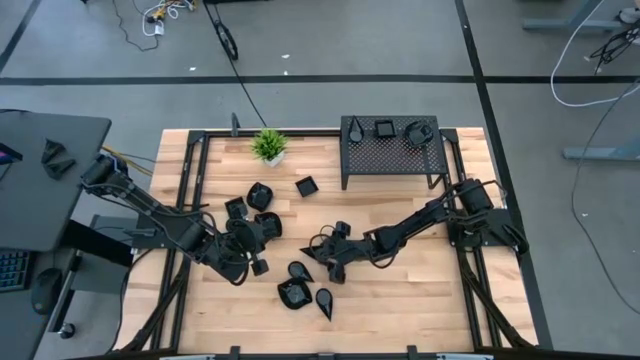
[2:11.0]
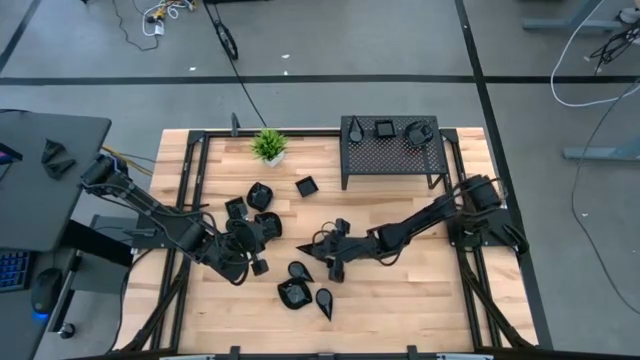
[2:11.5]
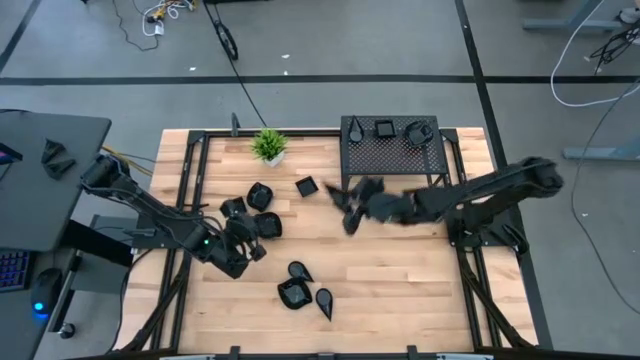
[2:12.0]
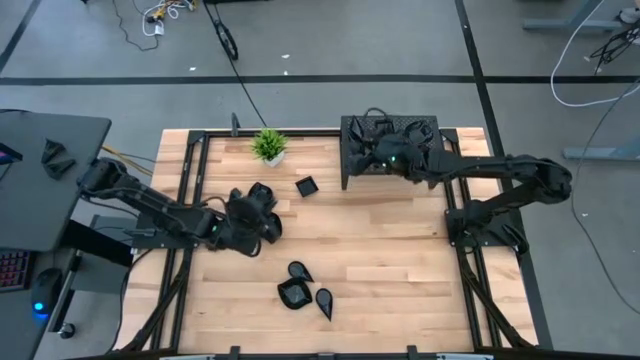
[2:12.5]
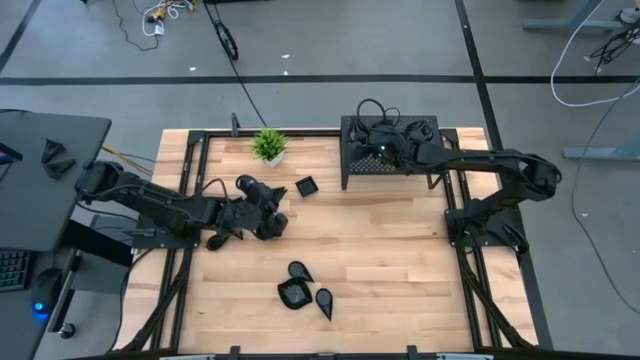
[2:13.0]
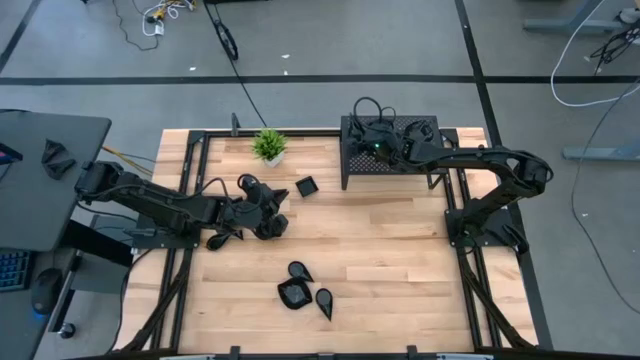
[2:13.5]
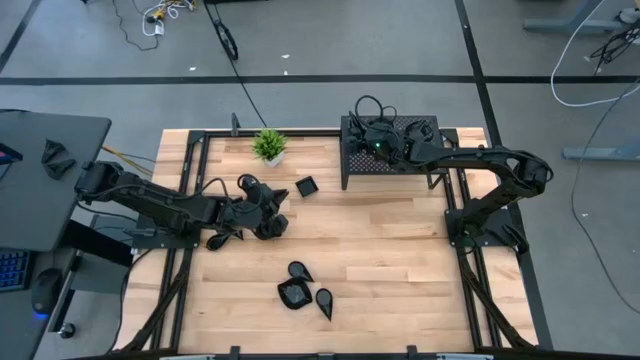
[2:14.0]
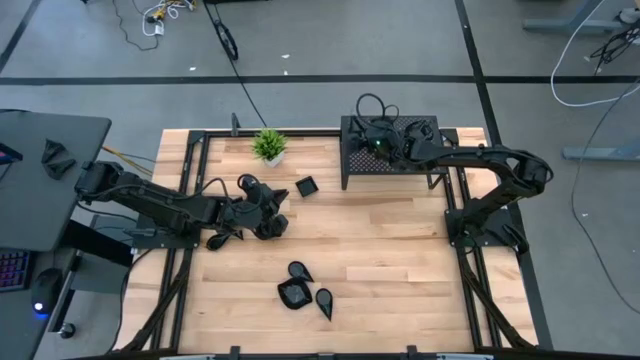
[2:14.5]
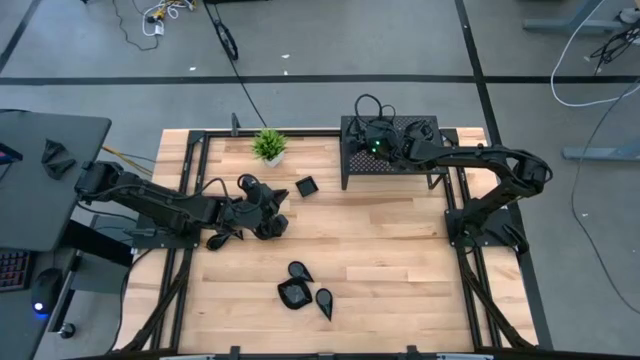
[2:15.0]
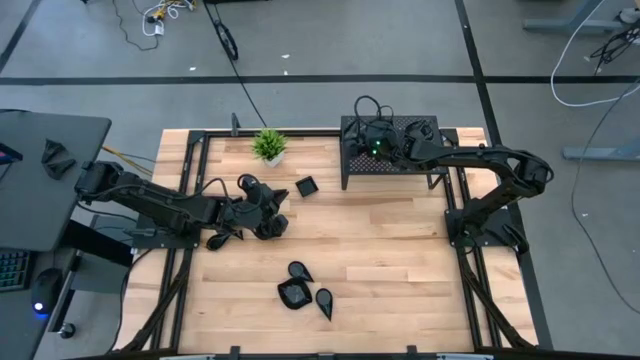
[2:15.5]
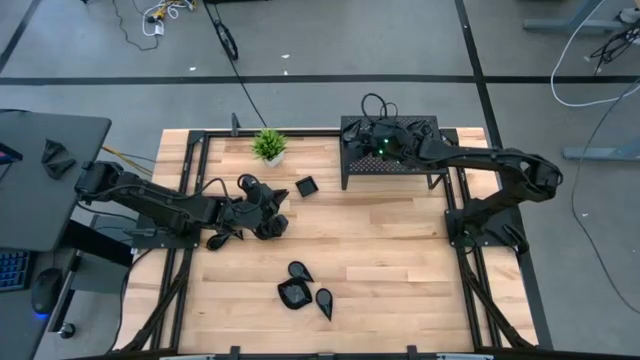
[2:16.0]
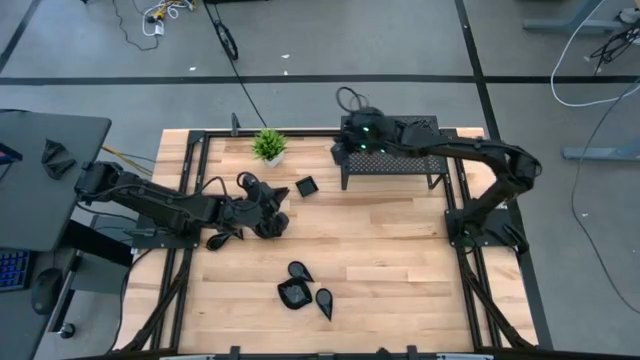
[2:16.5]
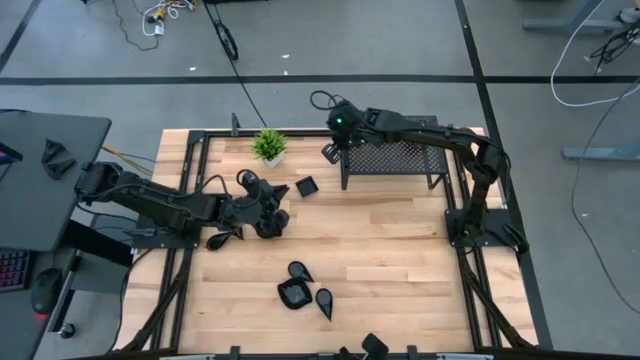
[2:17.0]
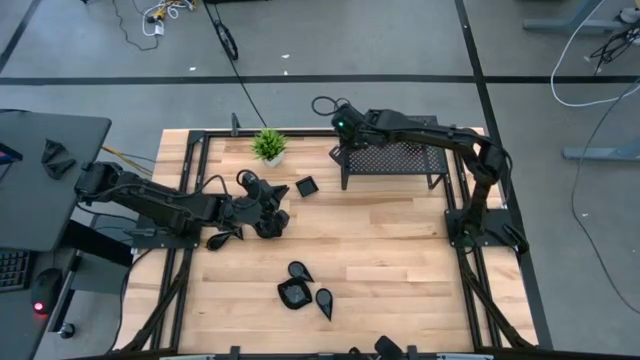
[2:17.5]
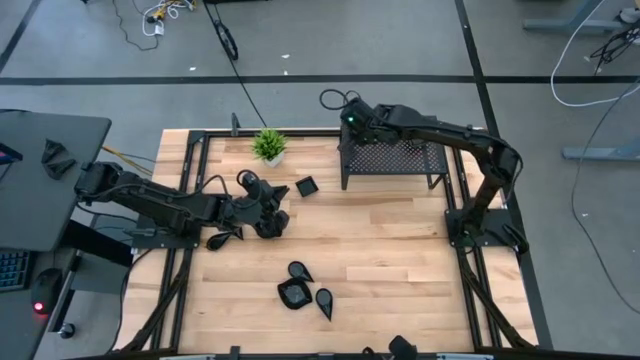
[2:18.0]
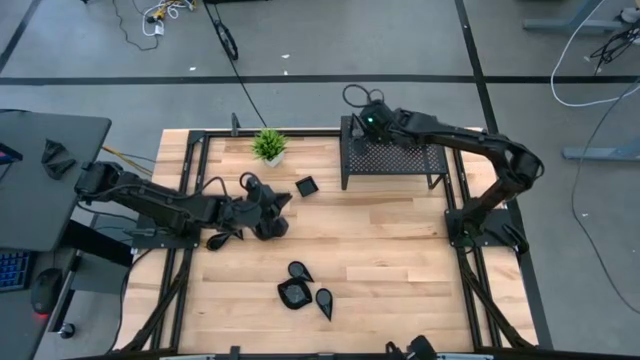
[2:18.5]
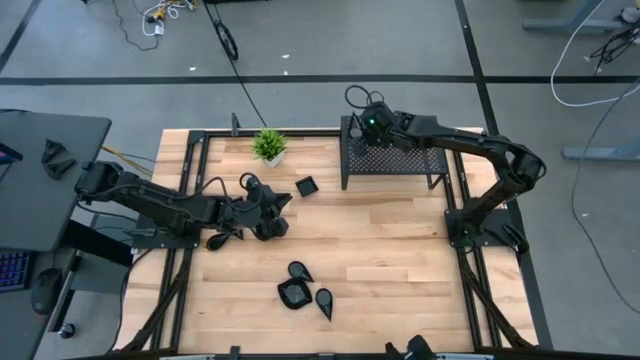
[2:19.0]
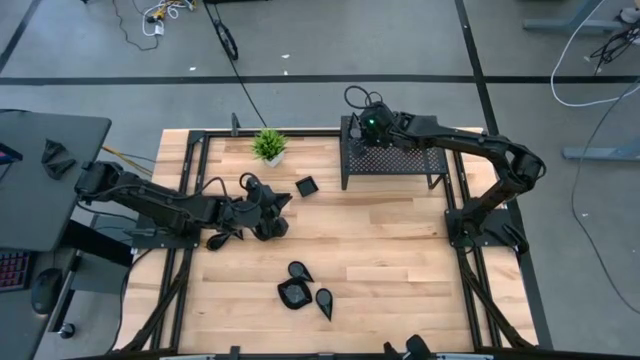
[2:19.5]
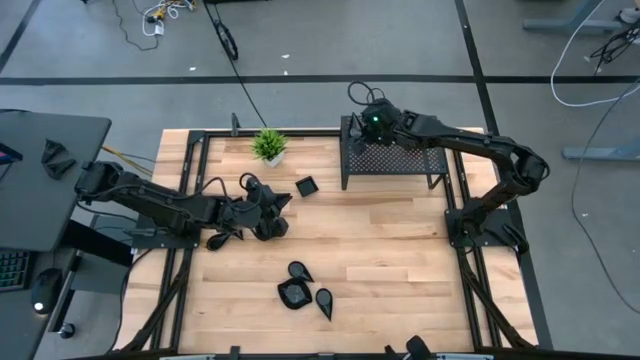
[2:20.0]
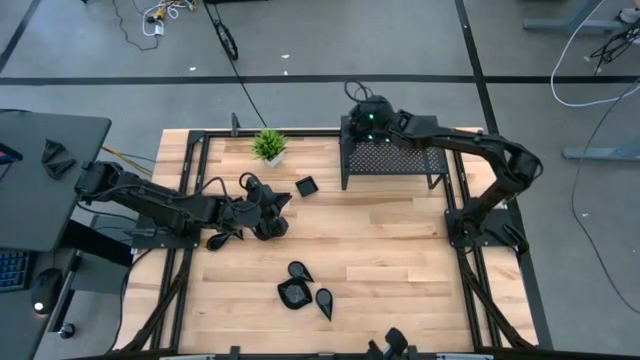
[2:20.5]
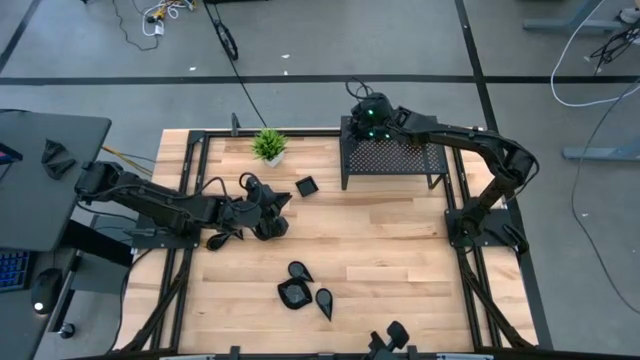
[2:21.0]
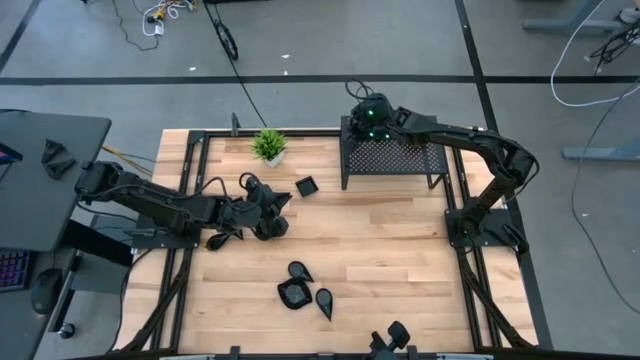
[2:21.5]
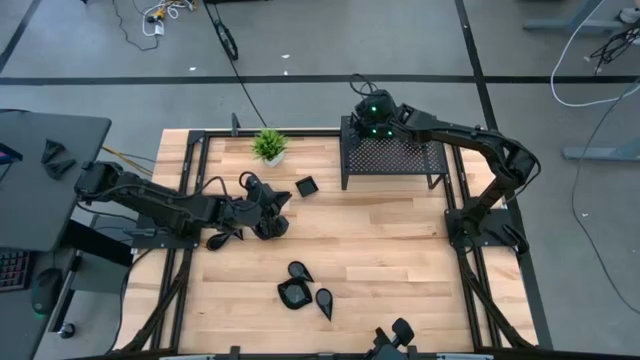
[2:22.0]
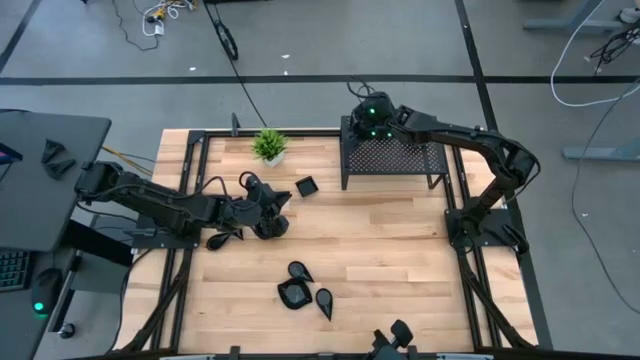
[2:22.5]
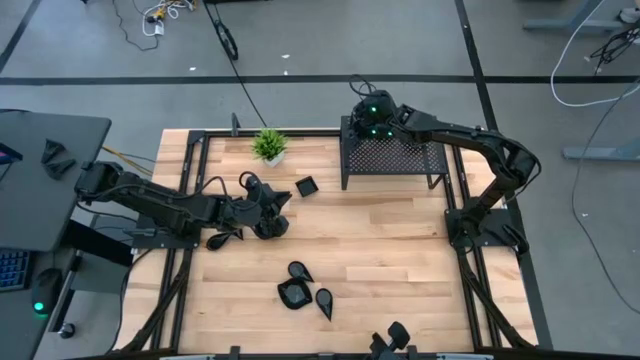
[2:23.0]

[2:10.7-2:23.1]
Task: Pick & Place Mini shaped plates
Stack the black drop-shaped plate on top of the black drop-shaped plate on the shelf

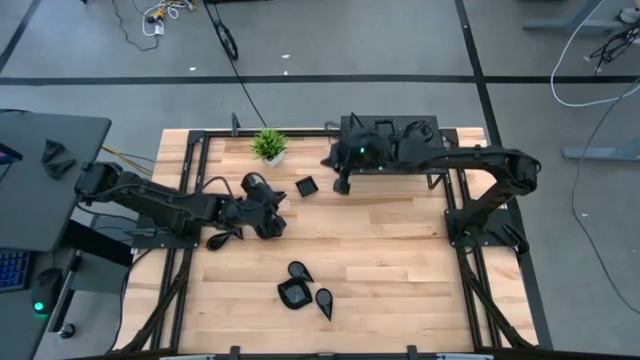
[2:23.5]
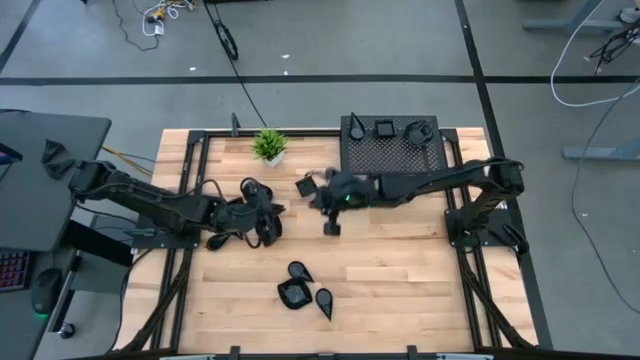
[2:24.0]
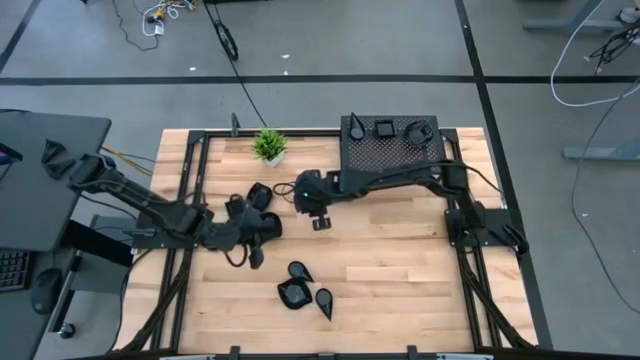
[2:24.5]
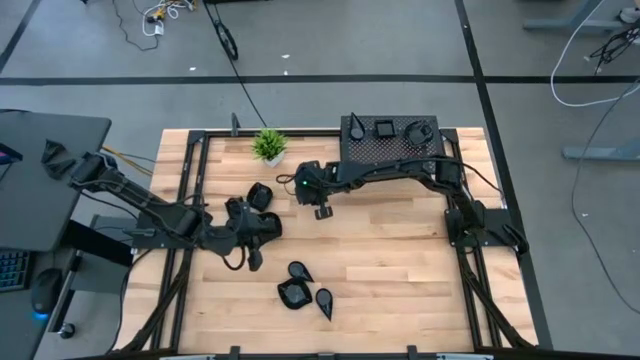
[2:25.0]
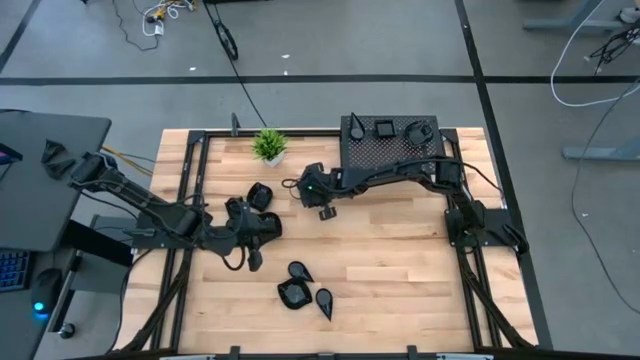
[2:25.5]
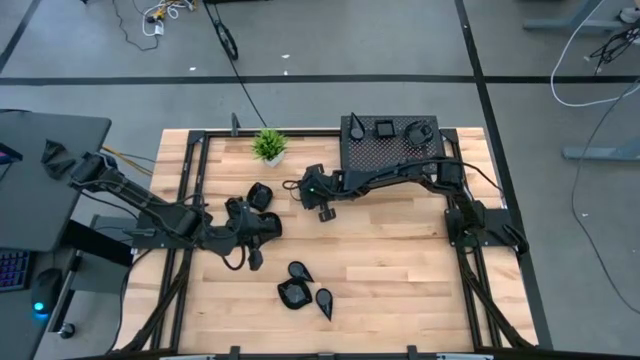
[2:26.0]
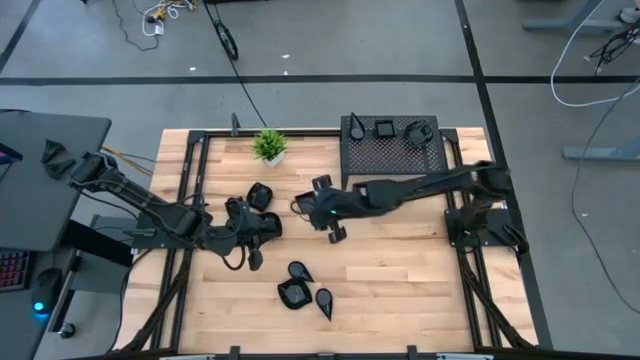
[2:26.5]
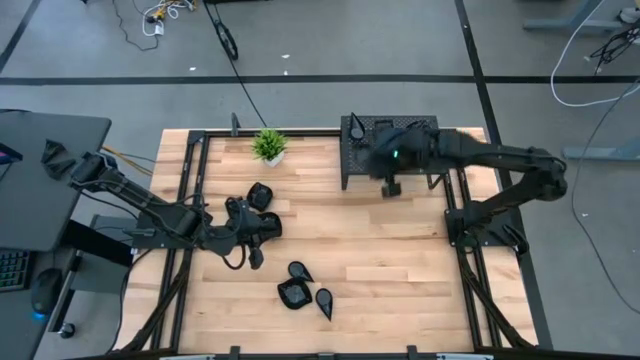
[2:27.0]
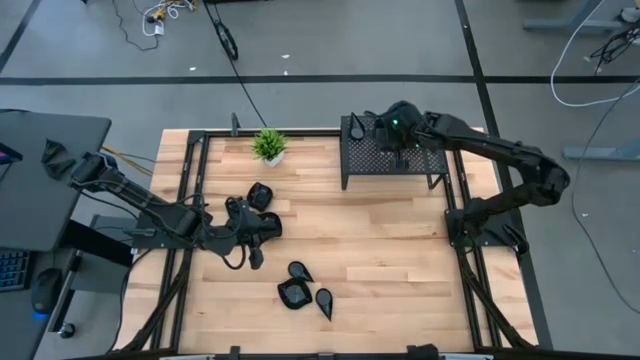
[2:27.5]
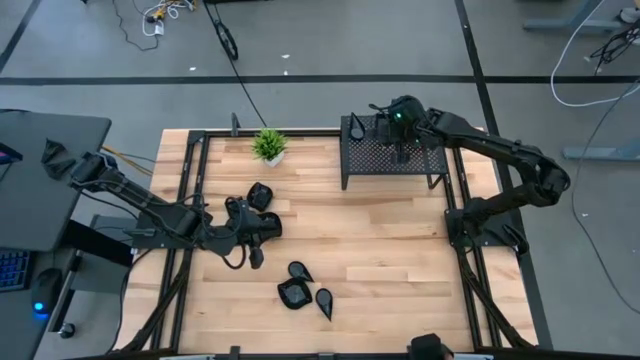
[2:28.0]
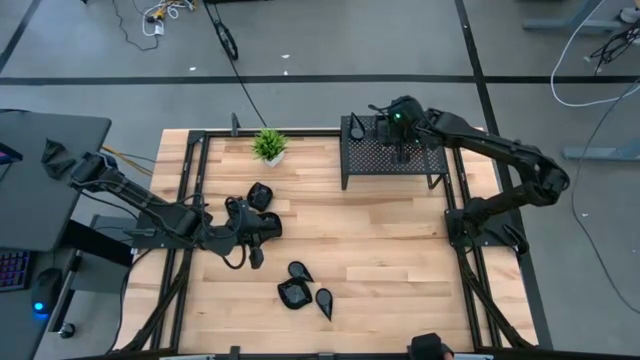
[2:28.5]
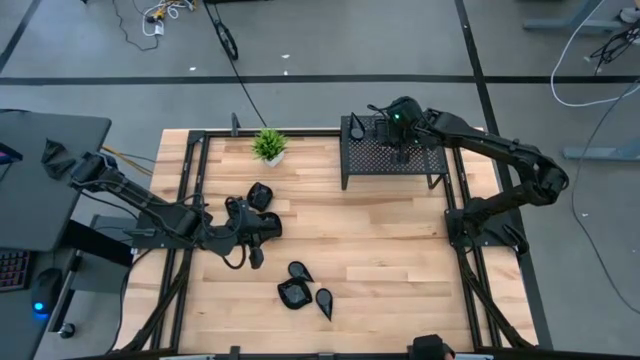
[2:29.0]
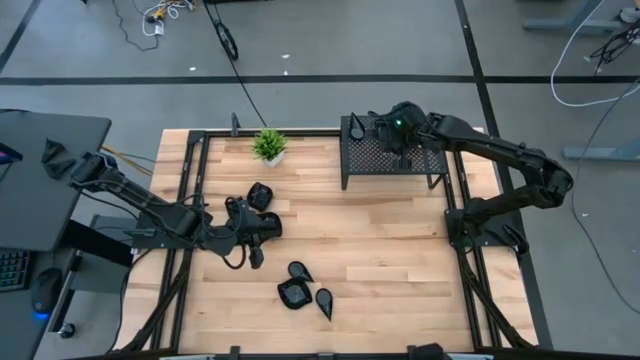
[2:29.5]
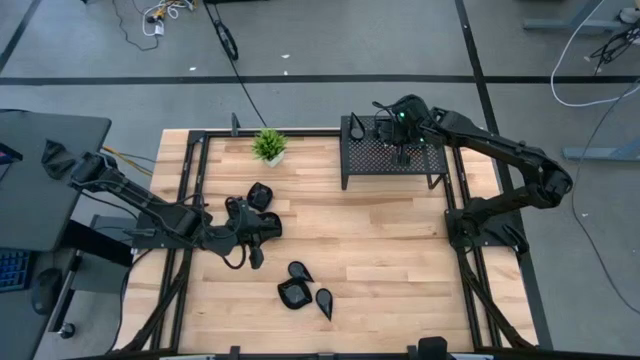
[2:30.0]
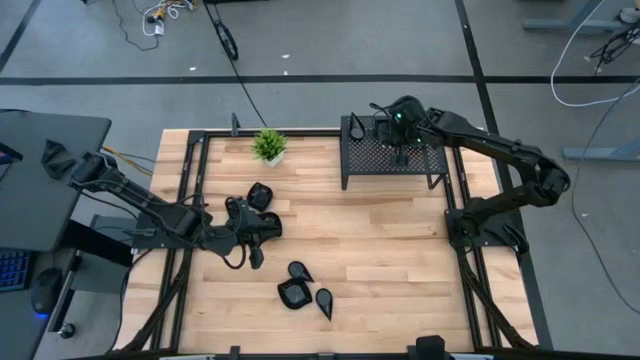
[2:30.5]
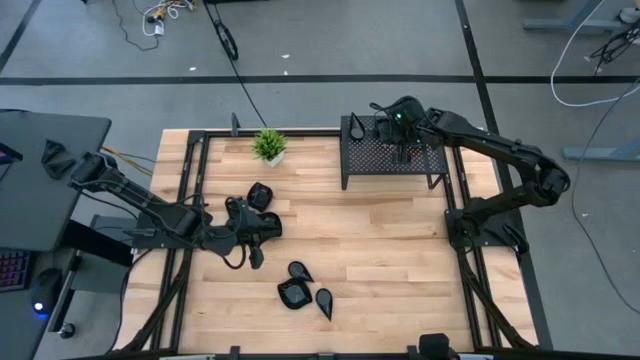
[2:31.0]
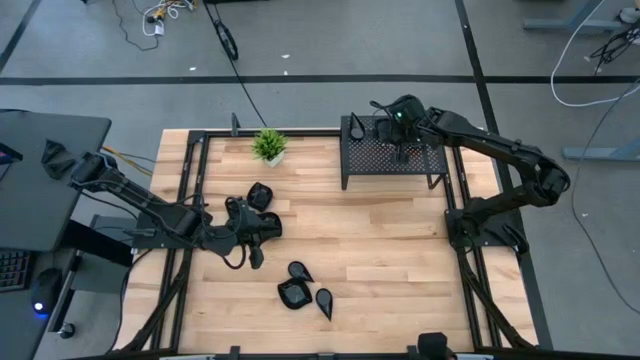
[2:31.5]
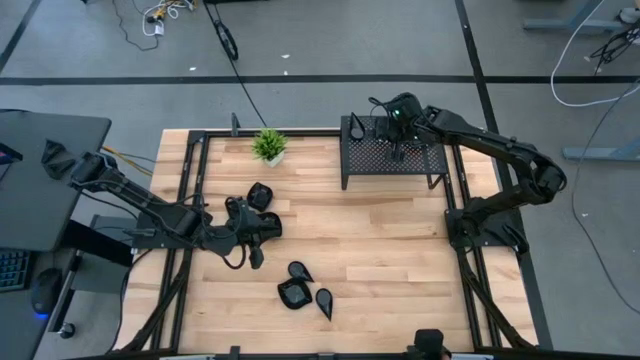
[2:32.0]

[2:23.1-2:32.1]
Stack the black square plate on top of the black square plate on the shelf

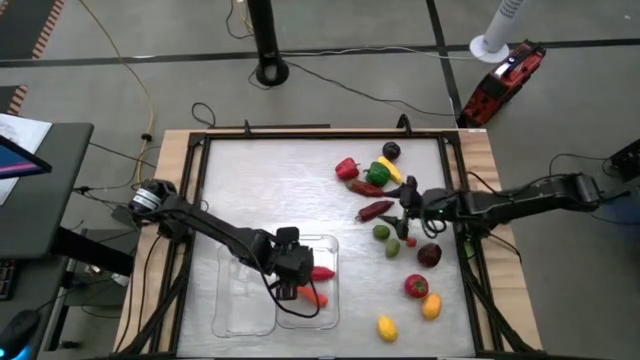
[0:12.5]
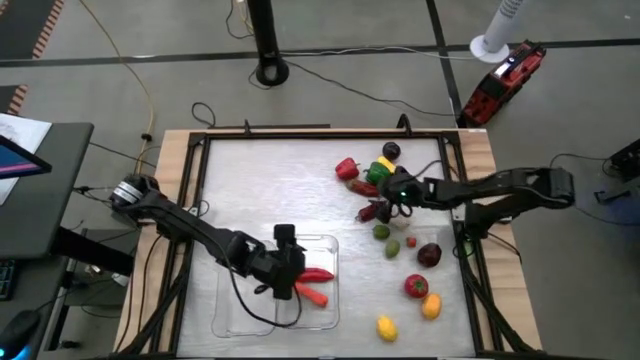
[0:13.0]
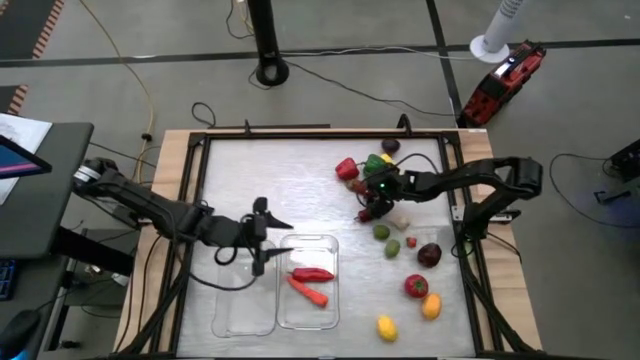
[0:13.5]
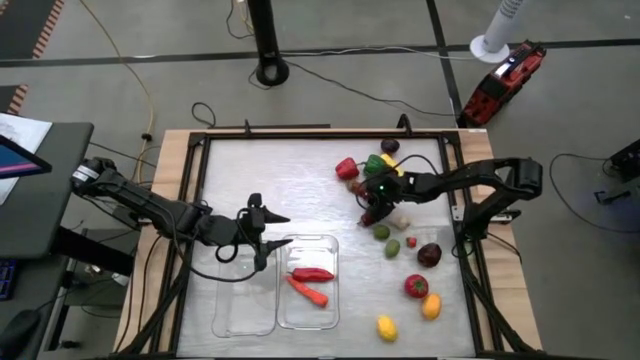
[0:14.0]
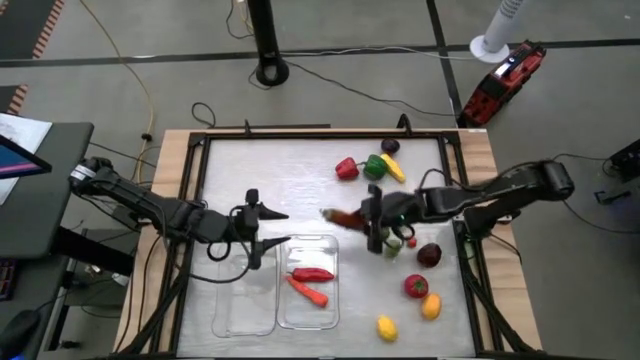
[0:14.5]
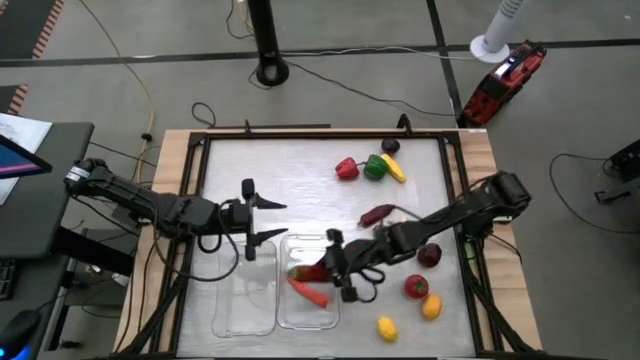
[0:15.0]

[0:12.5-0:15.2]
Task: Sort produce into baskets
Put the top dark red chili pepper into the right transparent bin
